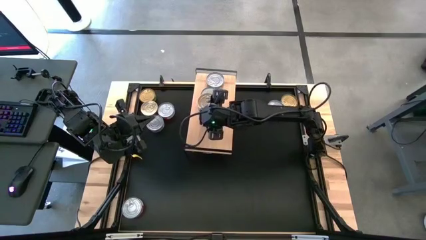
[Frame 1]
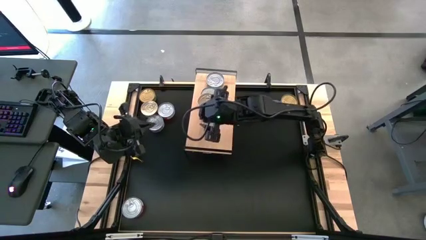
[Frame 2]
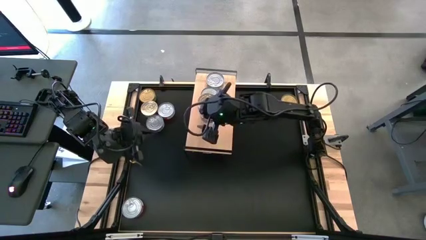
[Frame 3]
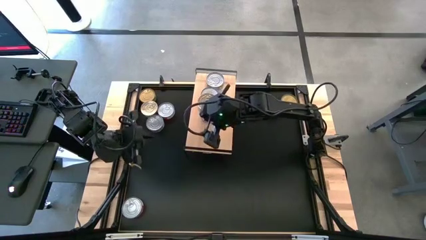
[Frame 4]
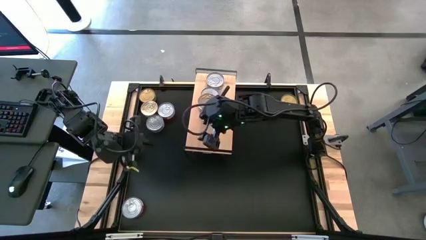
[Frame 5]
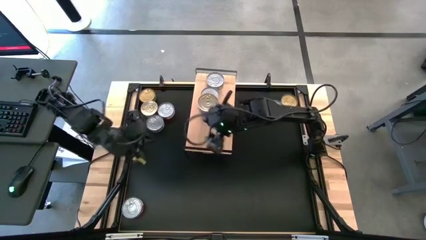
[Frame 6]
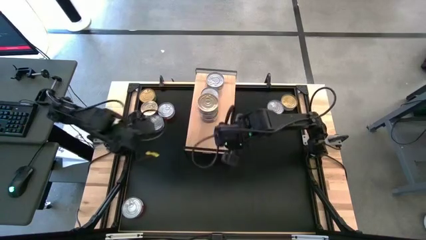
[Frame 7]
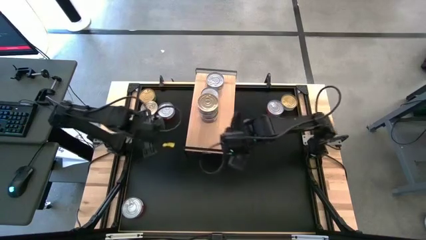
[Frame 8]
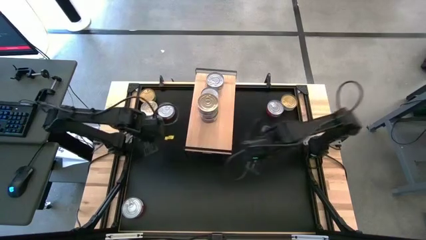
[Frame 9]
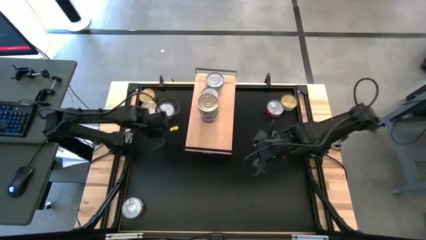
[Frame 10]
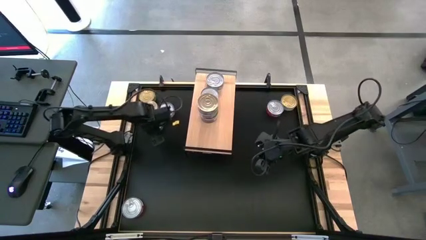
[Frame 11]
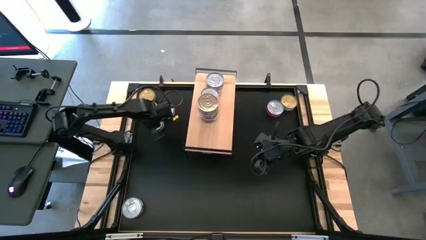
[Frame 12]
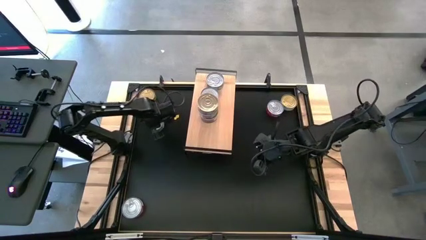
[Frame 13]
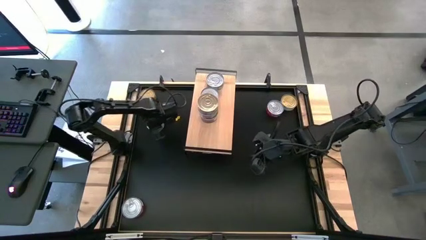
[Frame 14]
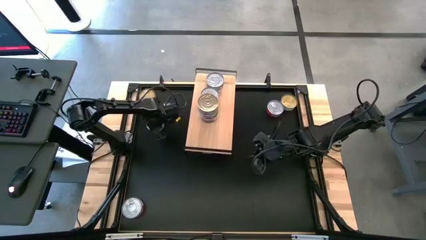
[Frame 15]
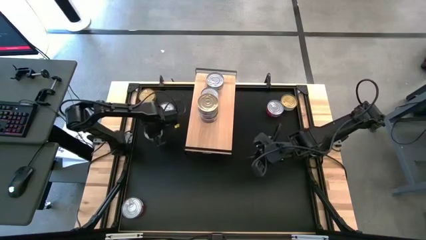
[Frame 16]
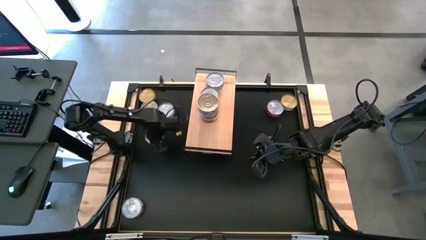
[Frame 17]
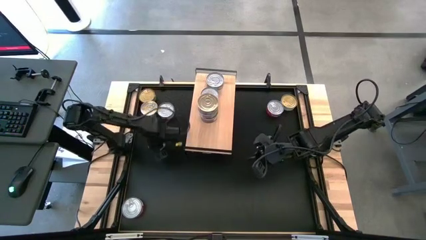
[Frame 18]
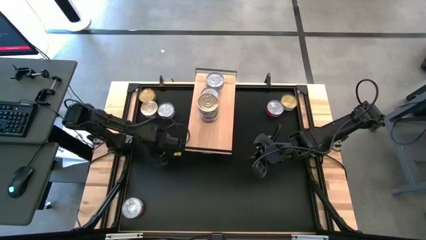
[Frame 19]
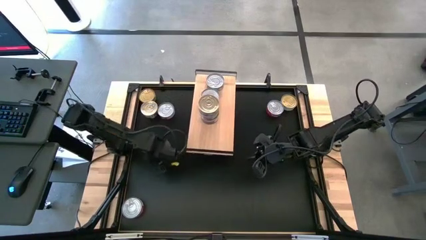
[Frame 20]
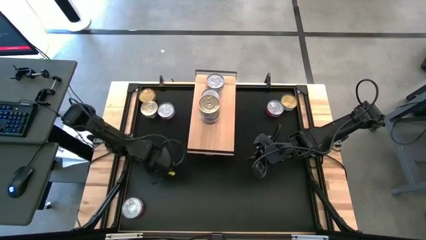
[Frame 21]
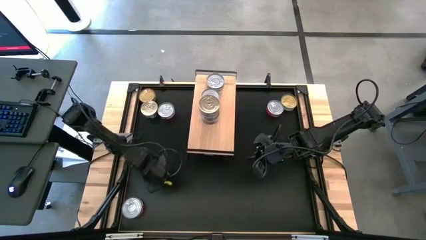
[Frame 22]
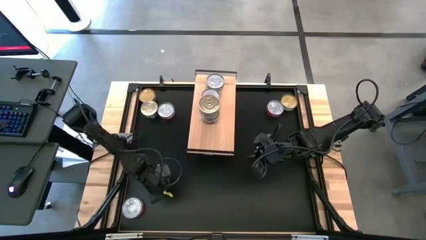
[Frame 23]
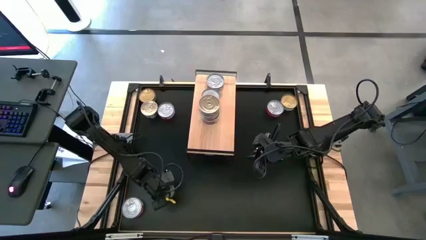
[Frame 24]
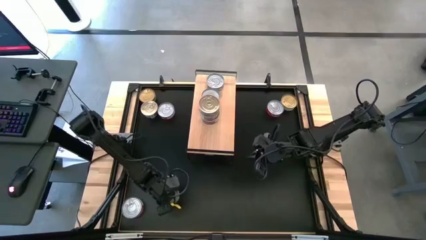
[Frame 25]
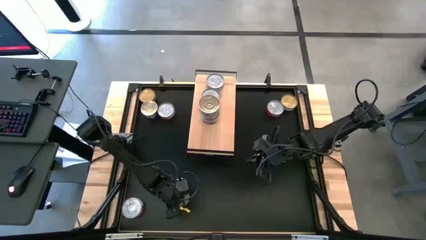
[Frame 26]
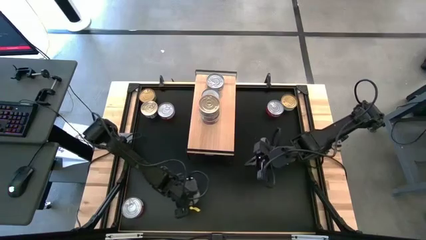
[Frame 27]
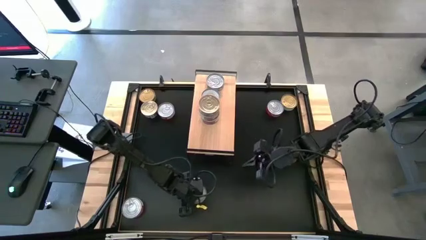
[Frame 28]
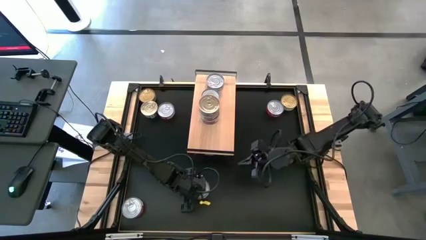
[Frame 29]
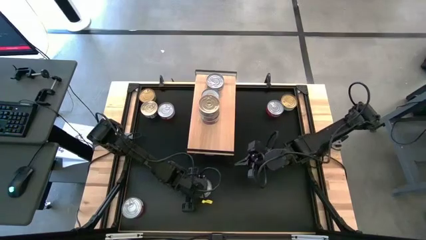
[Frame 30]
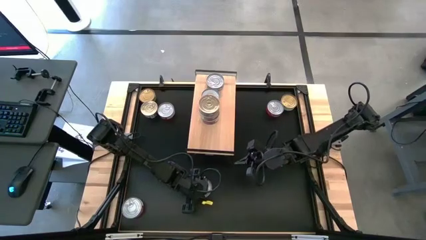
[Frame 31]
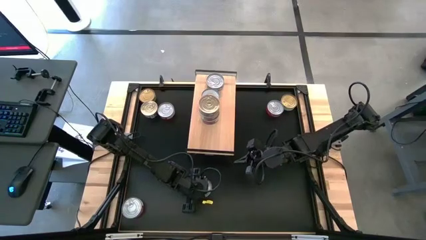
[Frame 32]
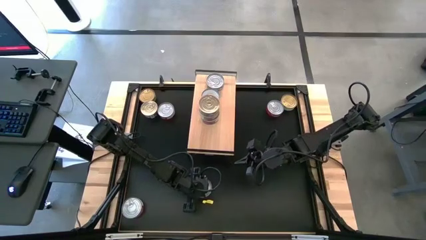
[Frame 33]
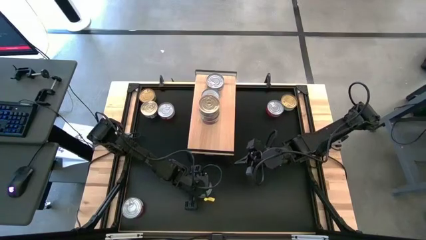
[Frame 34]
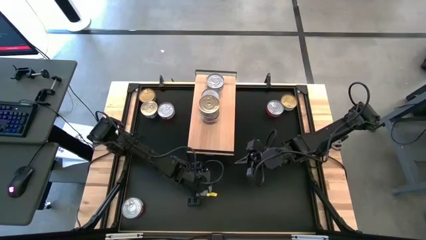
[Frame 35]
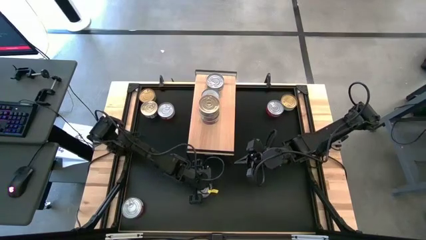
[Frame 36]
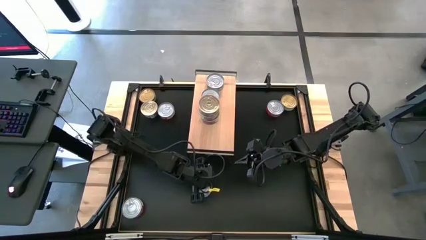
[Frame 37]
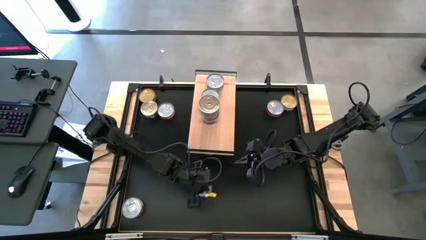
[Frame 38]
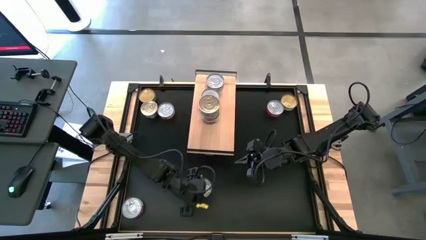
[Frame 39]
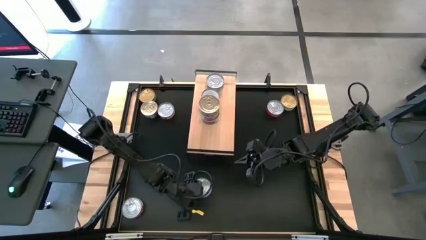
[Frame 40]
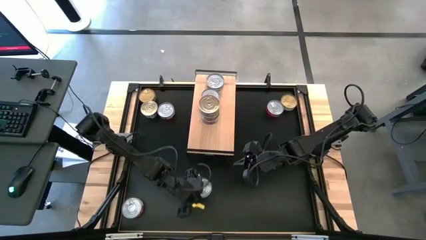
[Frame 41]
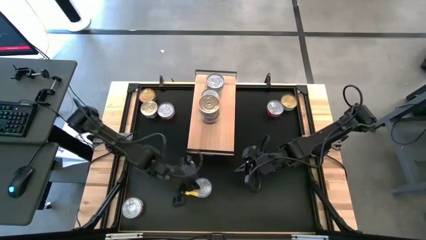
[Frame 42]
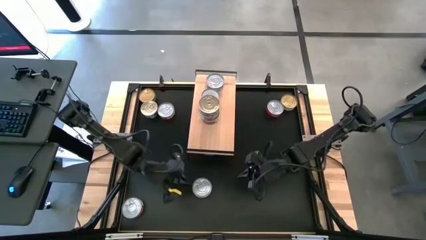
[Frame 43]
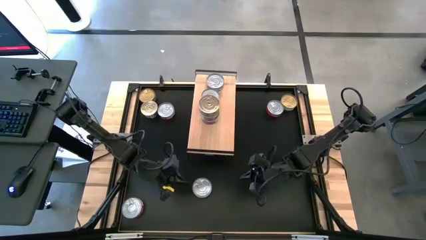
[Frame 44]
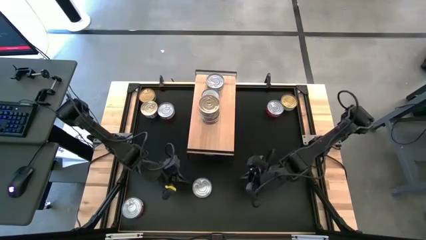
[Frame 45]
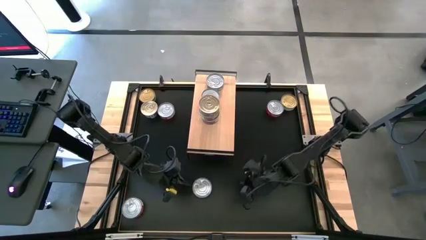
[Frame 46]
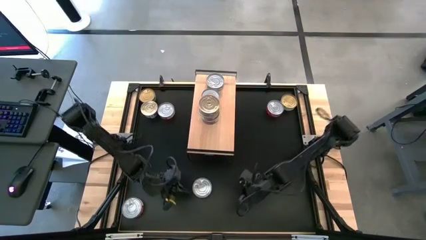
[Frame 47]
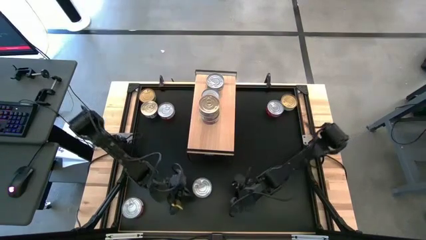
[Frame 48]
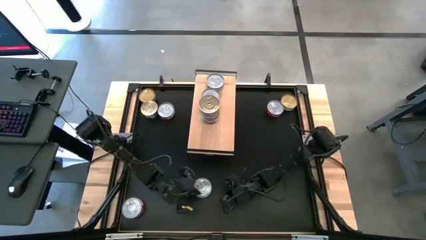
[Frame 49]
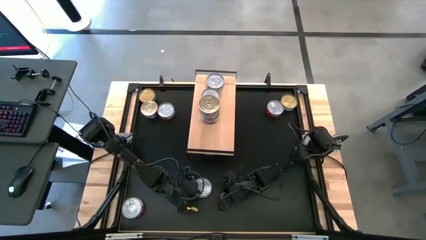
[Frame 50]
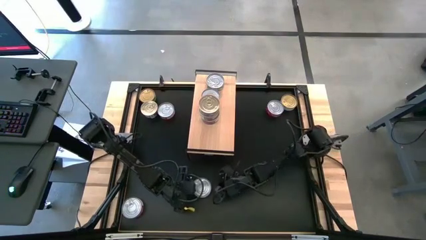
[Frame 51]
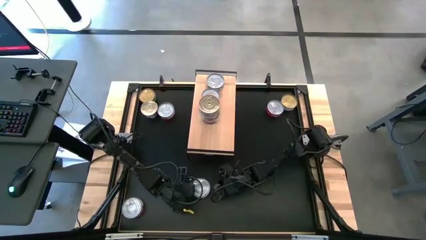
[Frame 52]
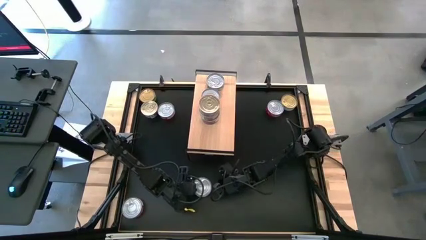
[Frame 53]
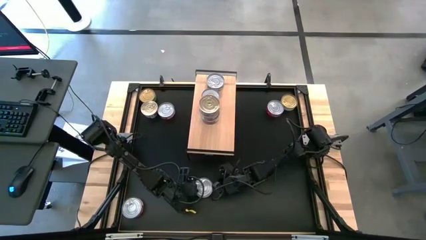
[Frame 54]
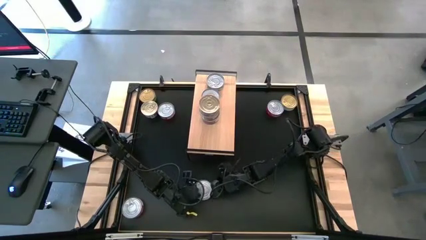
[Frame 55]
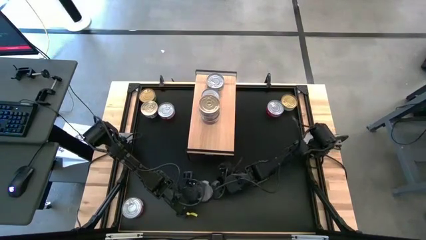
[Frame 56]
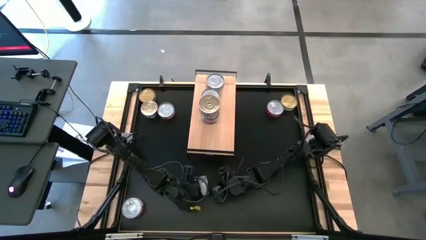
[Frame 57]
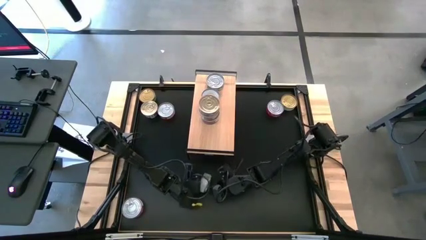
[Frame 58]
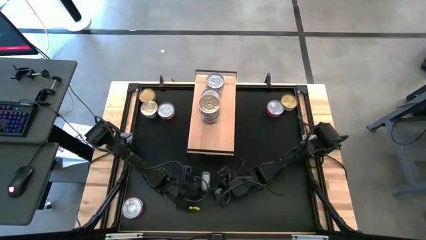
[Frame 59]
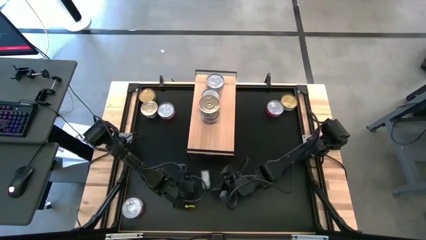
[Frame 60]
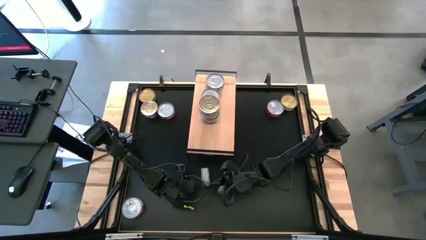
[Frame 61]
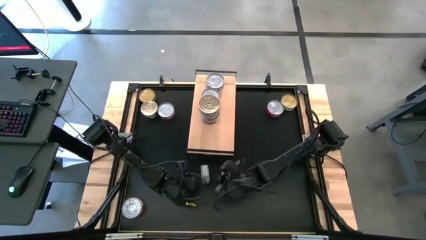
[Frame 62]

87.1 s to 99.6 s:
Task: Stack canned seafood by type on shelf
Stack the green tuna can on top of the green tuna can on the shelf

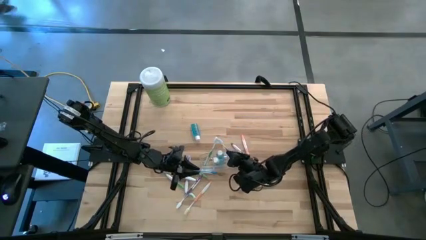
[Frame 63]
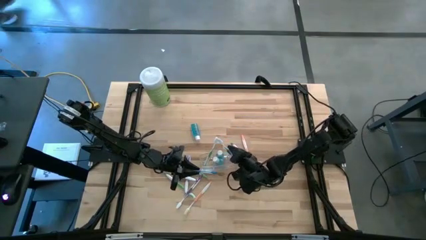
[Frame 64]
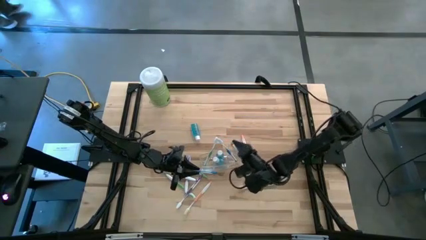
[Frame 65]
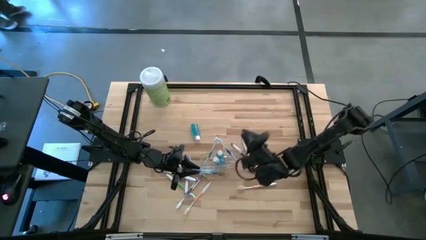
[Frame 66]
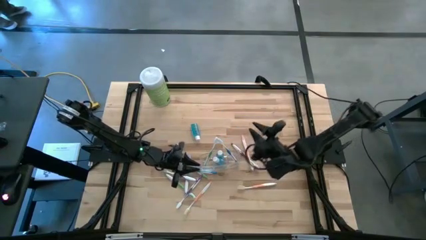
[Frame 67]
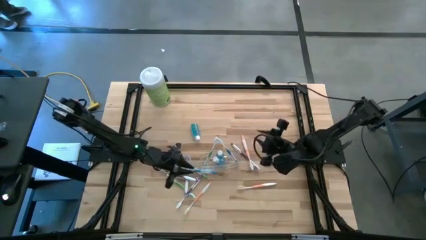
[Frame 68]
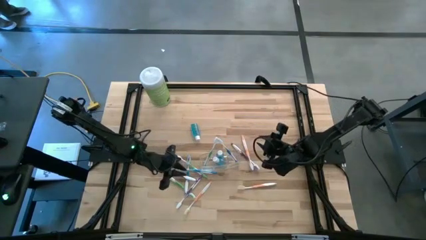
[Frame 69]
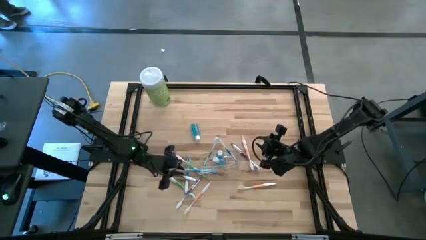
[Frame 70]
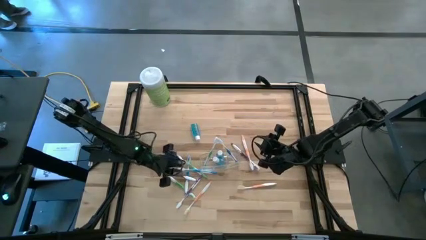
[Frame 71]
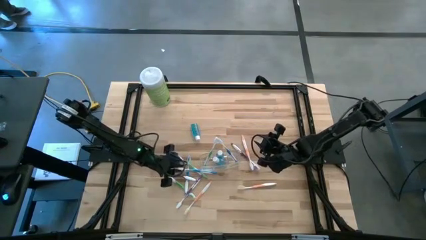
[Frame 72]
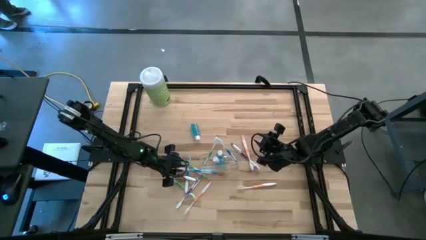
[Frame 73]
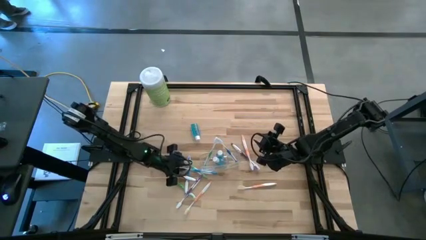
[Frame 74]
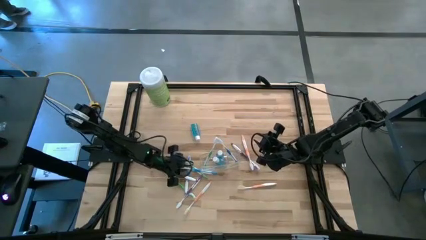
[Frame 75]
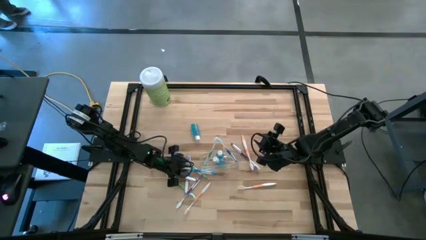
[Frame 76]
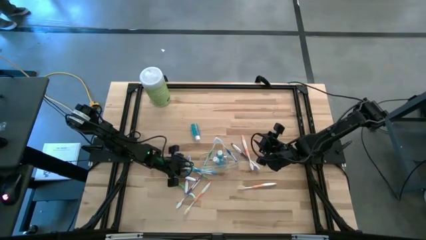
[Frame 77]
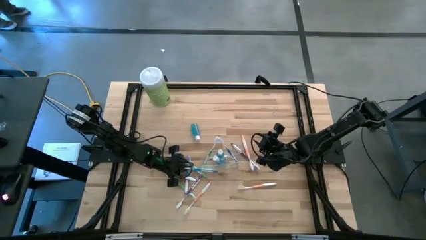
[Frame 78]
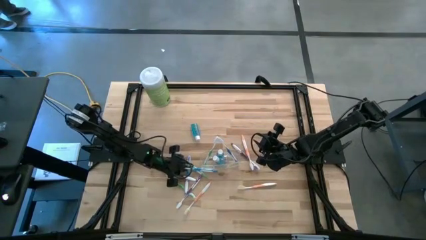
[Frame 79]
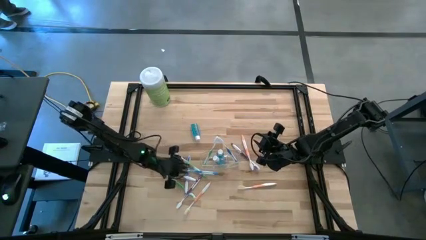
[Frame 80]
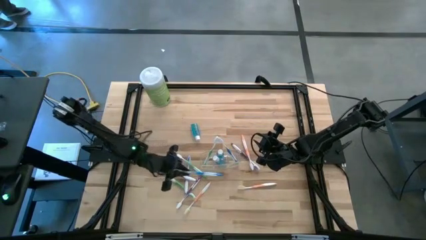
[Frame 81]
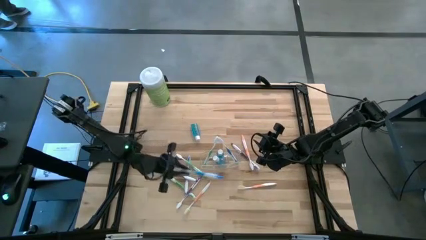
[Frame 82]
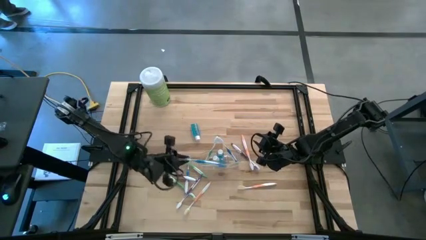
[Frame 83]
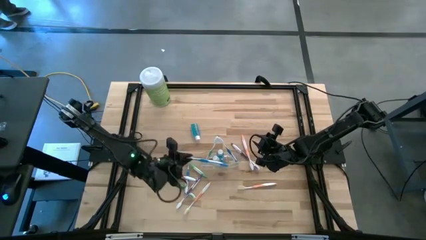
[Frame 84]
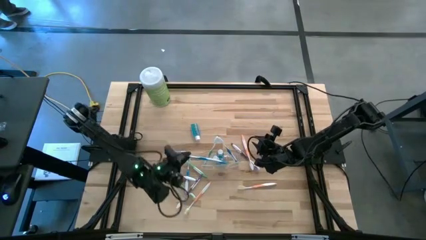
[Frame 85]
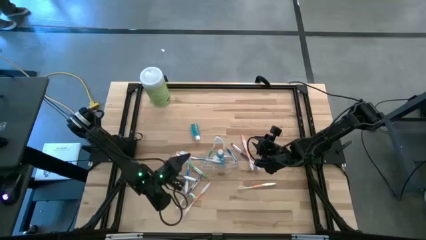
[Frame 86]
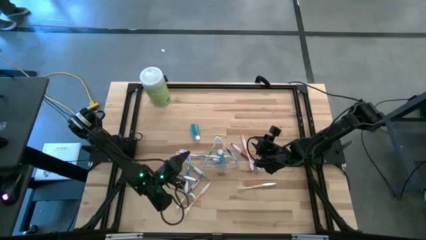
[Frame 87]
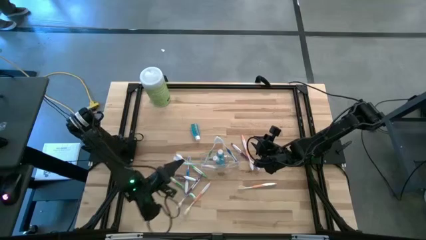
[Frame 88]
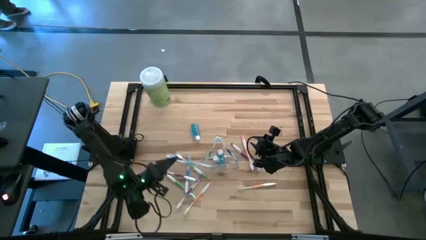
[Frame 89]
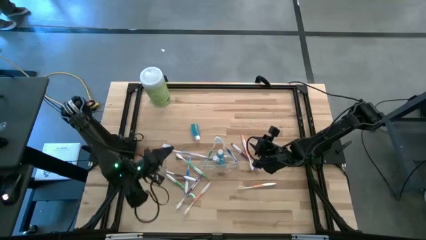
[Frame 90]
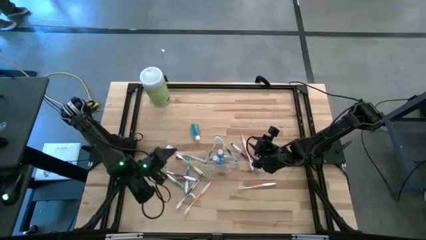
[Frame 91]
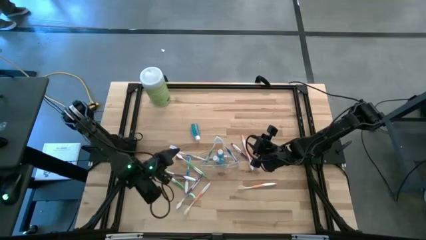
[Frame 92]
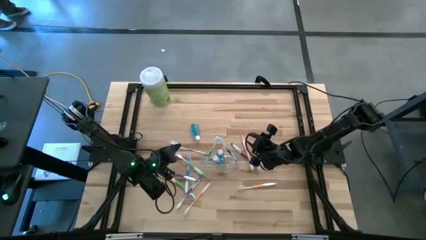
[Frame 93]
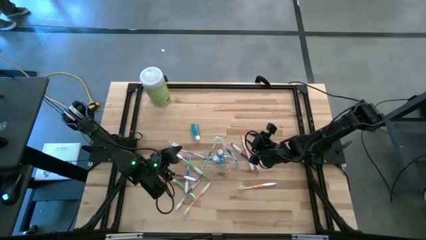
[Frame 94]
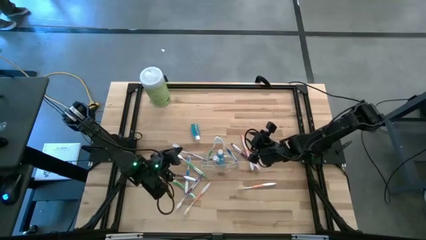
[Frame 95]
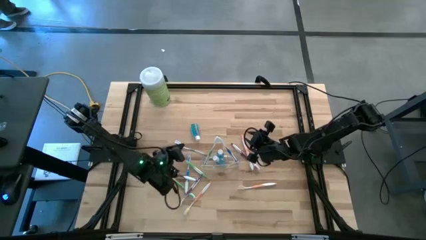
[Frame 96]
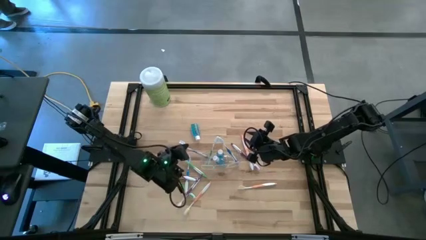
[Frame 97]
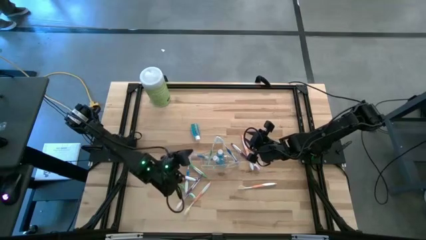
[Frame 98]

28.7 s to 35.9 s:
Task: Pick & Place toothbrushing station
Put the right blue toothbrush into the transparent organizer
